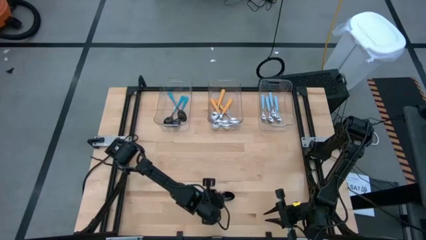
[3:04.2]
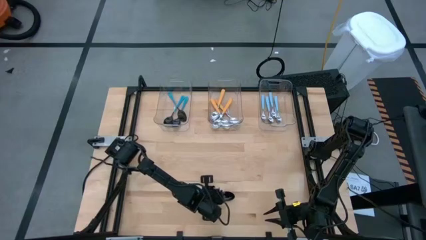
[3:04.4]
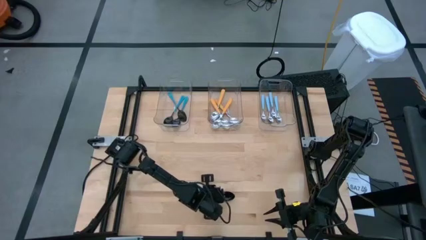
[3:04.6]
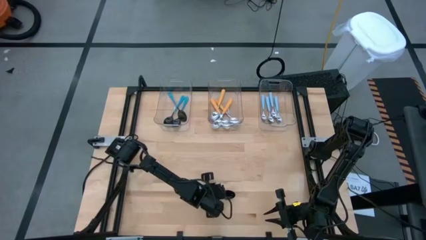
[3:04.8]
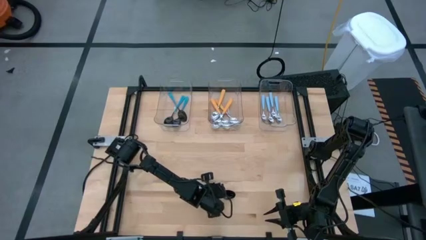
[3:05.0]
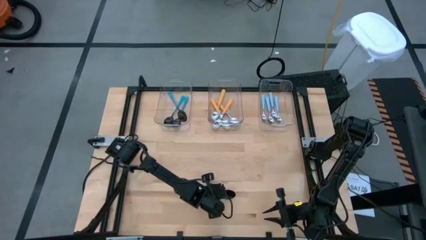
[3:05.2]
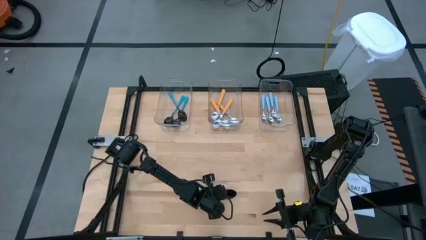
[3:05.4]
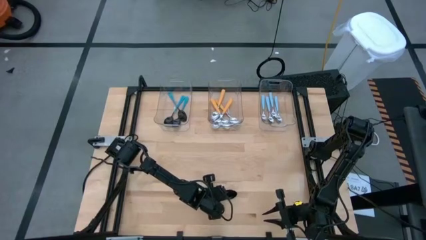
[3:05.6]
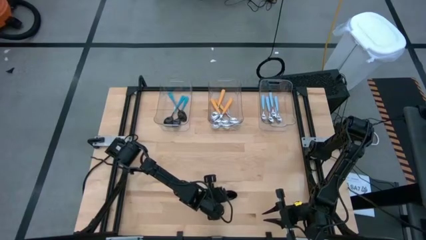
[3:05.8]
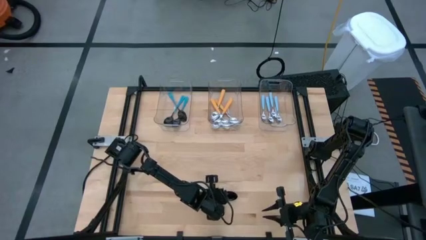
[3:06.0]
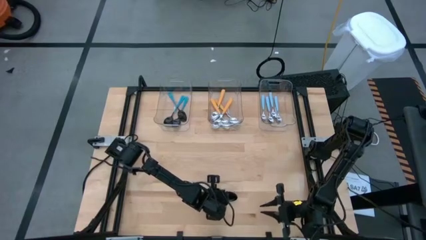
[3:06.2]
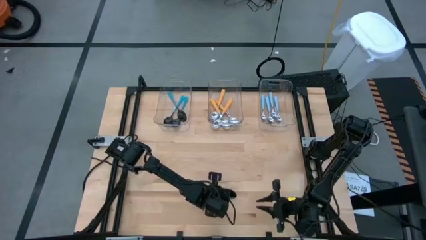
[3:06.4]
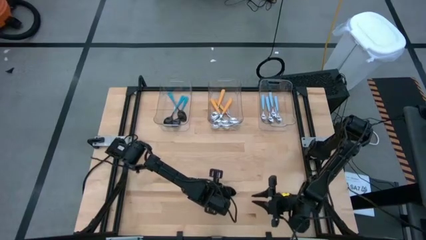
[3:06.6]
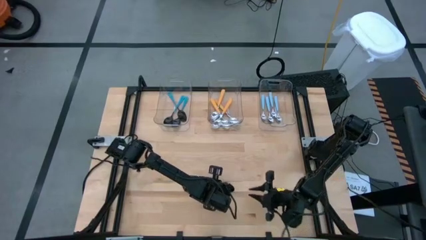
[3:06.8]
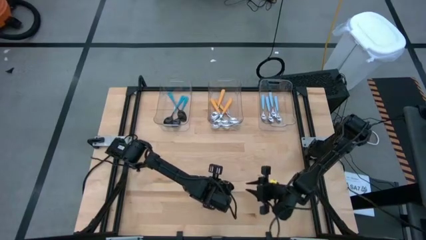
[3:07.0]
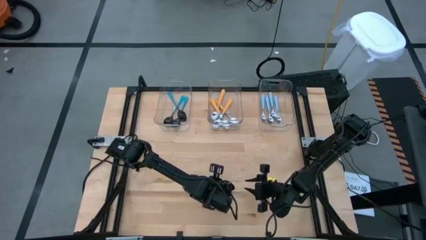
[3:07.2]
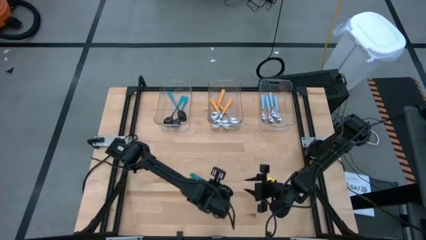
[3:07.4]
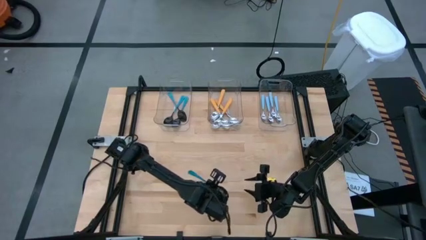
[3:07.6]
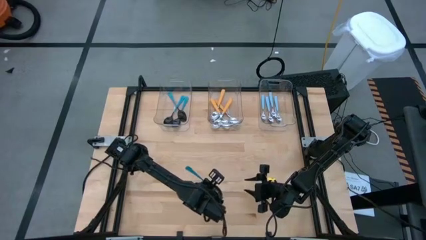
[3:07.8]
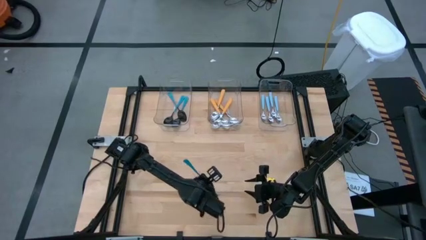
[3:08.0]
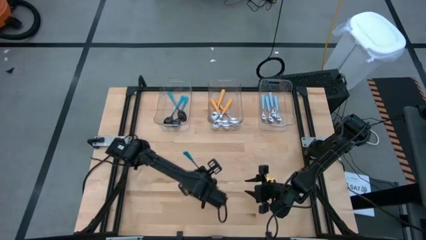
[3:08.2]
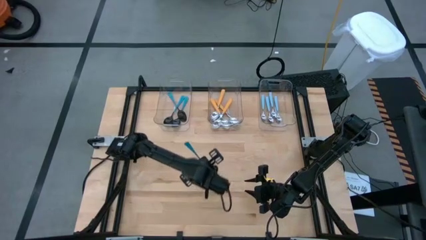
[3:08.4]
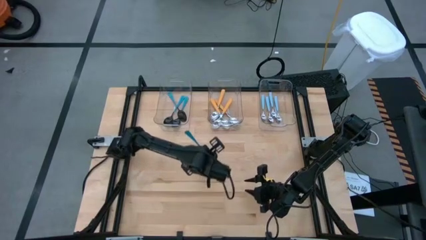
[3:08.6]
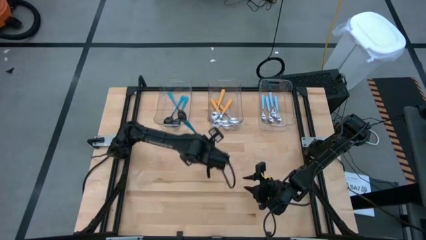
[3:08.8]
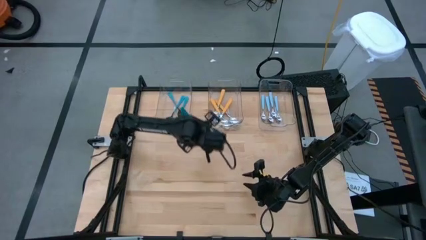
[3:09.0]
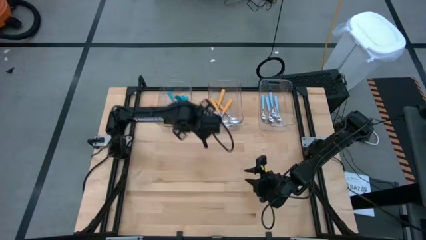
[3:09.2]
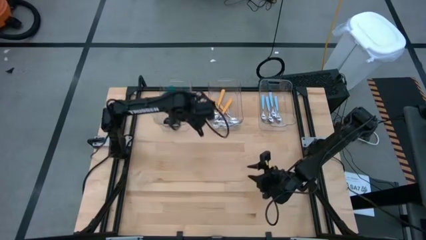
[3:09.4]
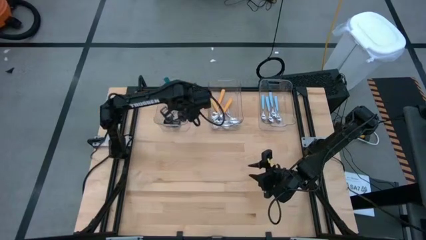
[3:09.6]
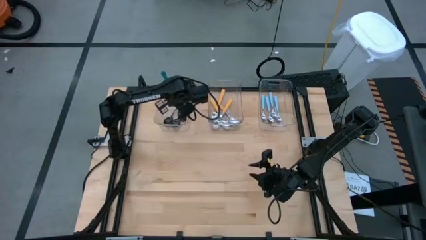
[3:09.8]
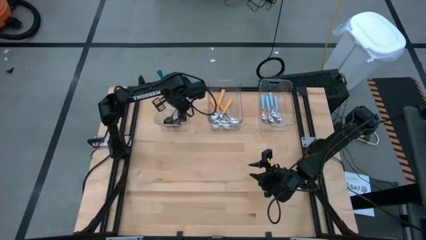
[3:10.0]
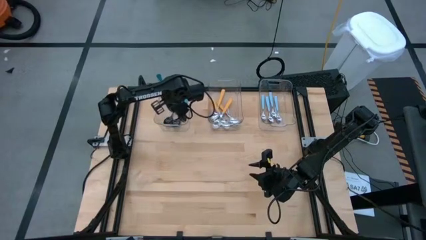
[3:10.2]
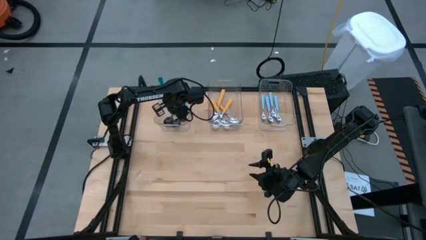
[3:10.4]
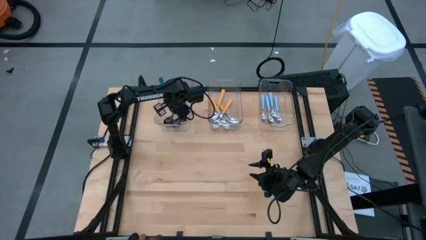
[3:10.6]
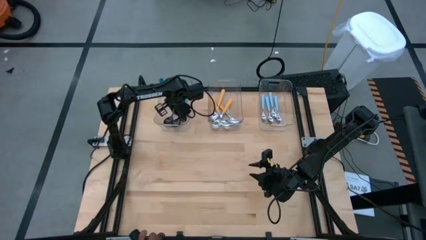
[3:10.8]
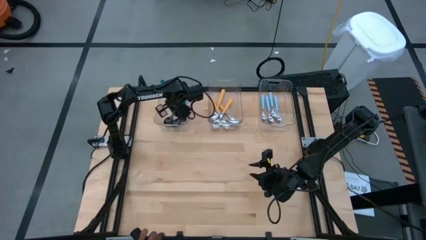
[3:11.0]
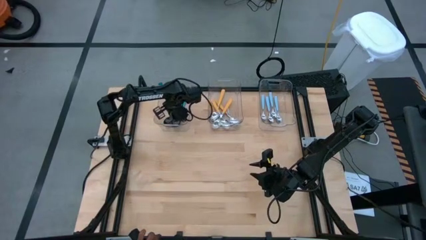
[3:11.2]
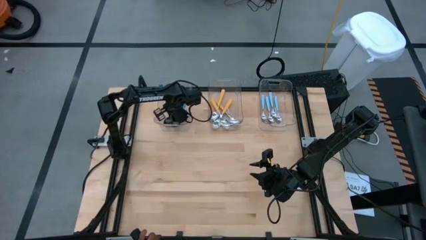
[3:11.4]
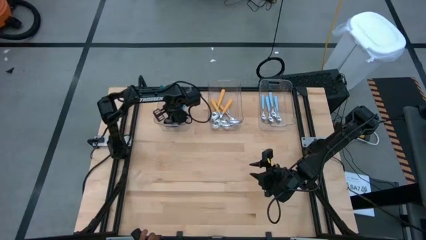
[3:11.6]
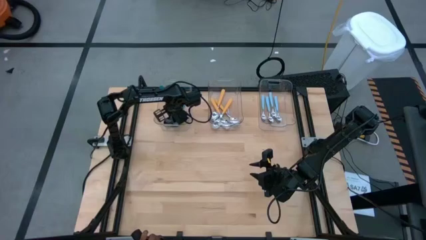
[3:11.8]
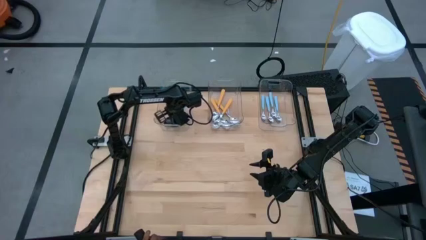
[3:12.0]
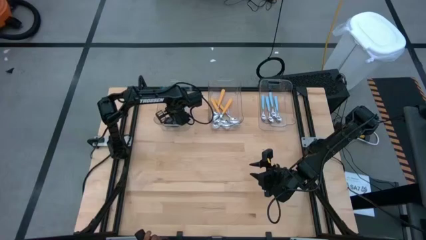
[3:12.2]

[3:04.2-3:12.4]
Task: Sort silverware by color (type)
Put the blue spoon into the left transparent bin

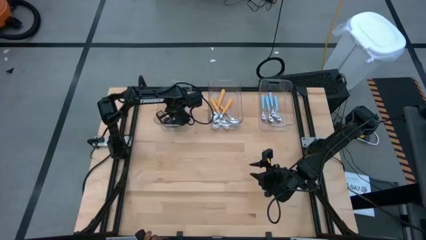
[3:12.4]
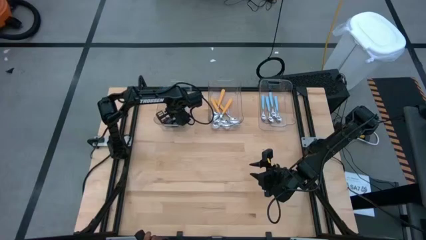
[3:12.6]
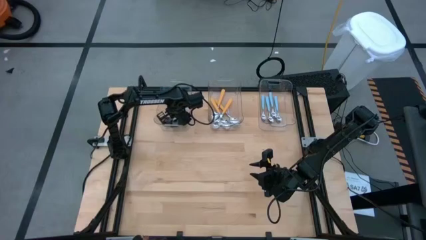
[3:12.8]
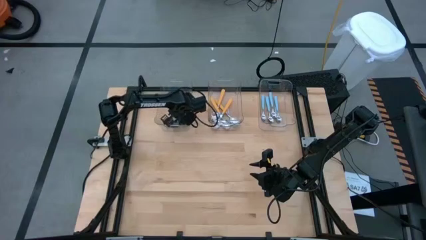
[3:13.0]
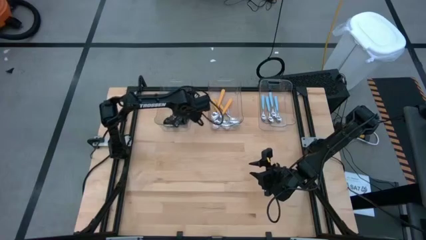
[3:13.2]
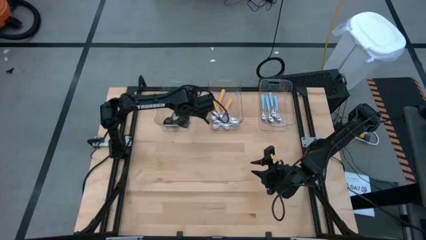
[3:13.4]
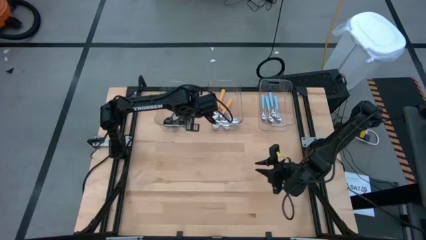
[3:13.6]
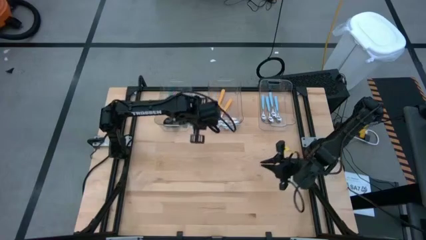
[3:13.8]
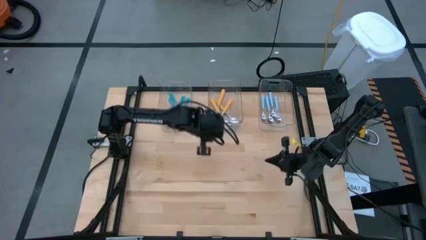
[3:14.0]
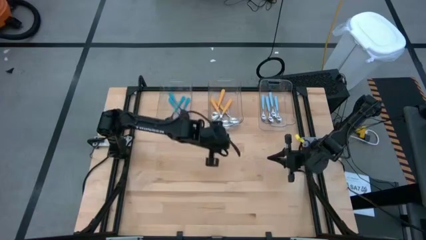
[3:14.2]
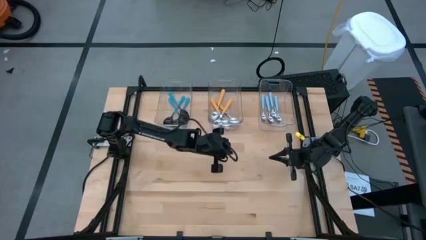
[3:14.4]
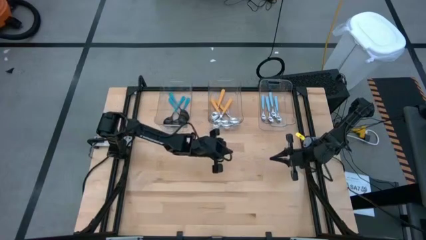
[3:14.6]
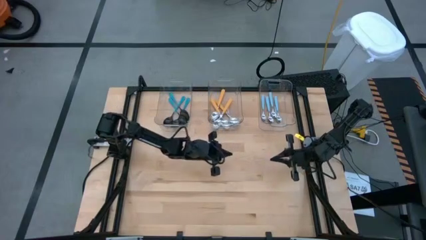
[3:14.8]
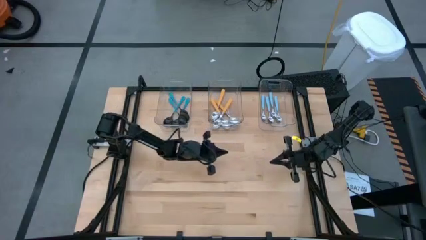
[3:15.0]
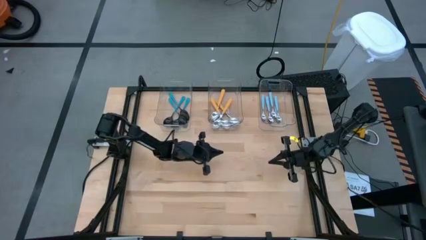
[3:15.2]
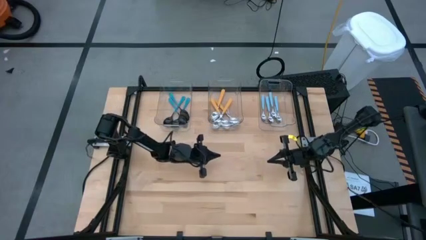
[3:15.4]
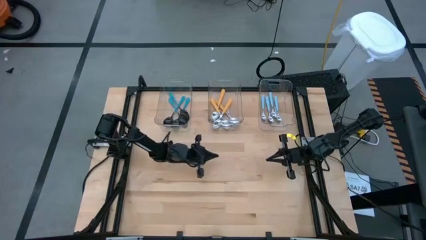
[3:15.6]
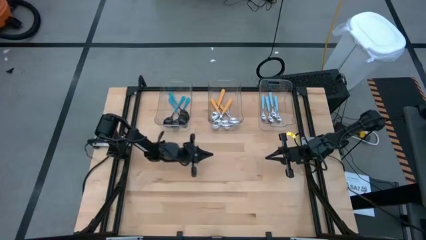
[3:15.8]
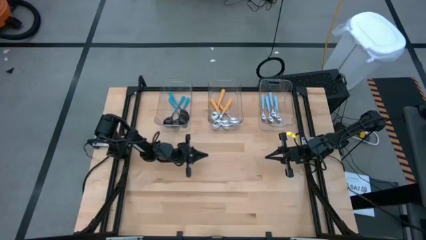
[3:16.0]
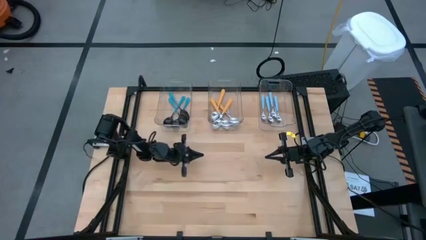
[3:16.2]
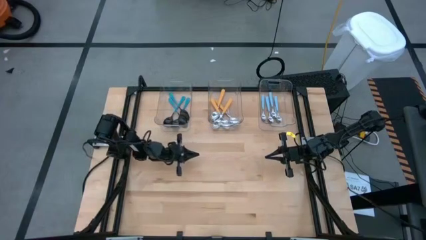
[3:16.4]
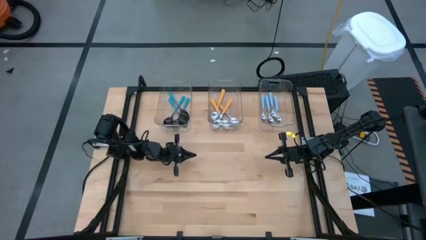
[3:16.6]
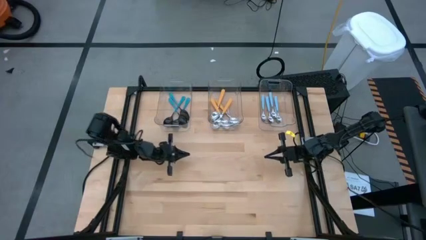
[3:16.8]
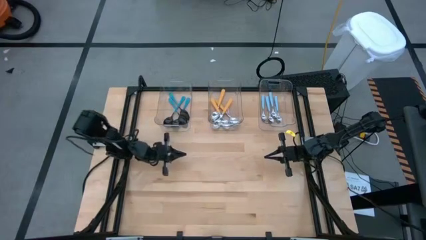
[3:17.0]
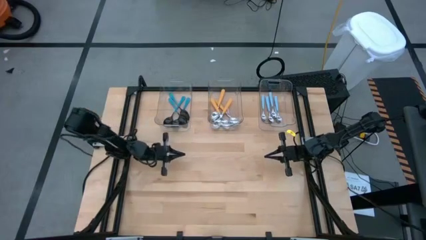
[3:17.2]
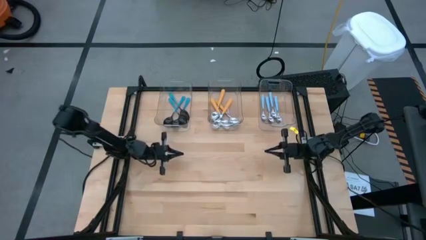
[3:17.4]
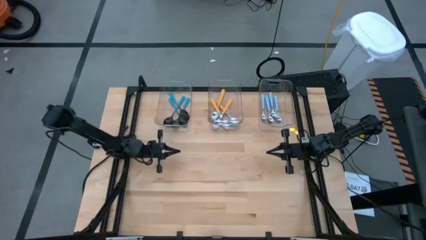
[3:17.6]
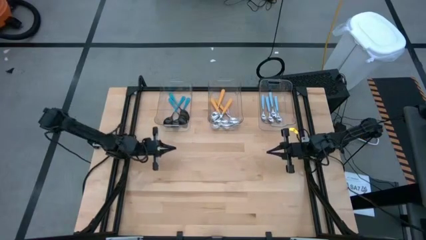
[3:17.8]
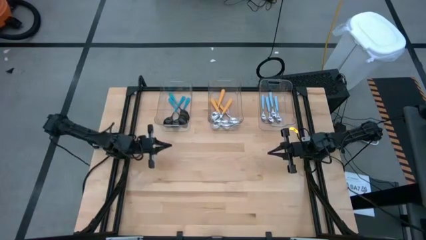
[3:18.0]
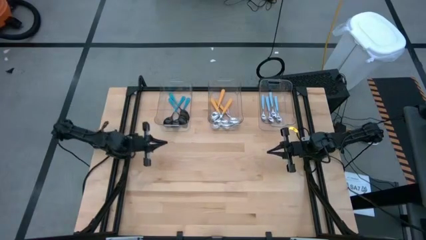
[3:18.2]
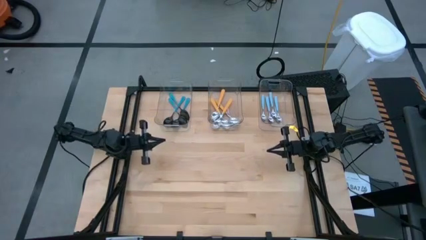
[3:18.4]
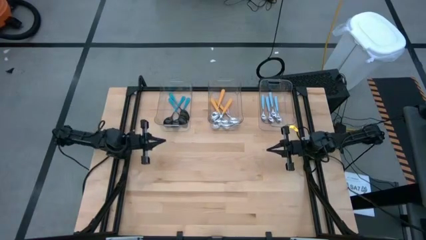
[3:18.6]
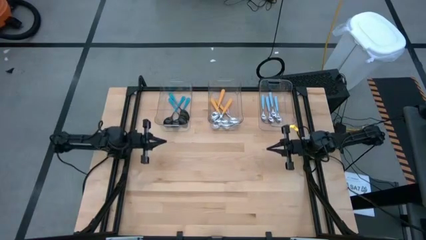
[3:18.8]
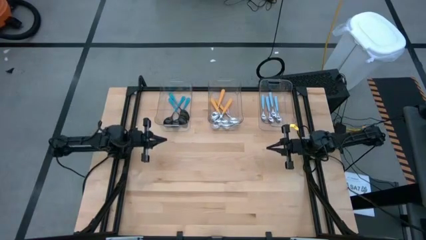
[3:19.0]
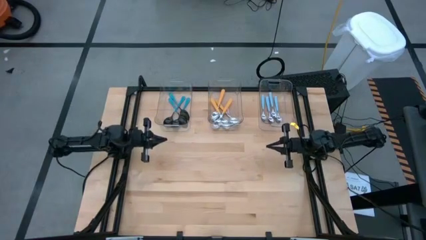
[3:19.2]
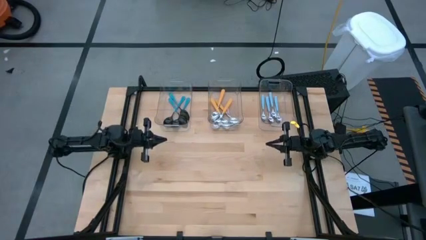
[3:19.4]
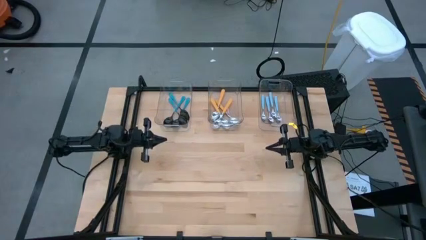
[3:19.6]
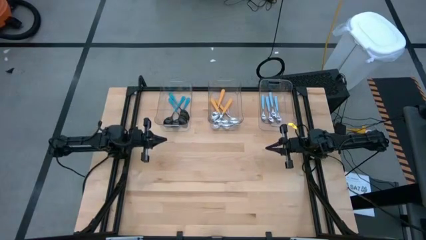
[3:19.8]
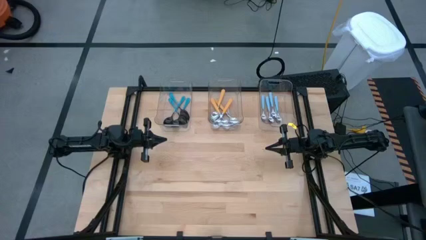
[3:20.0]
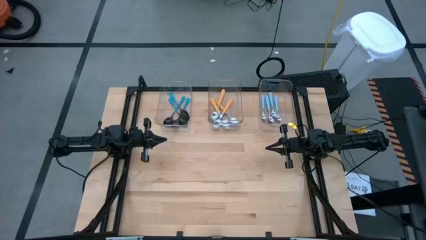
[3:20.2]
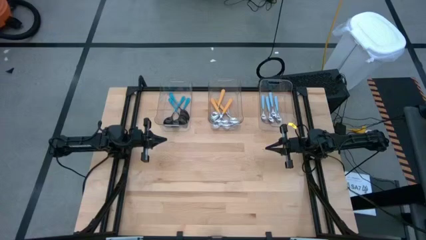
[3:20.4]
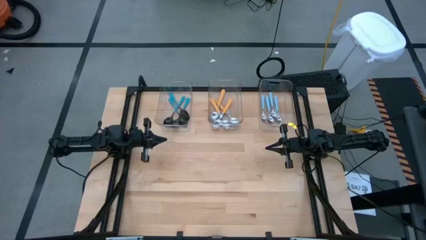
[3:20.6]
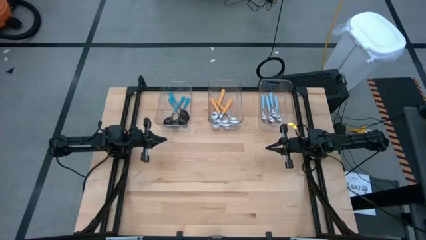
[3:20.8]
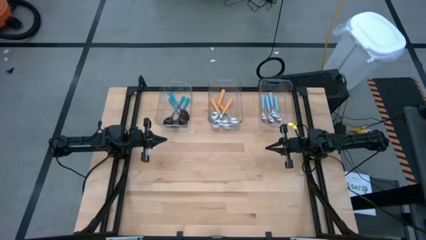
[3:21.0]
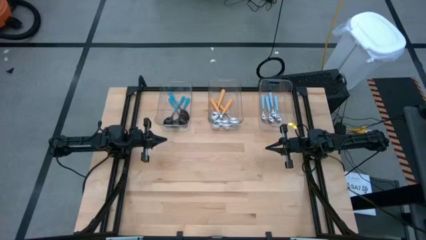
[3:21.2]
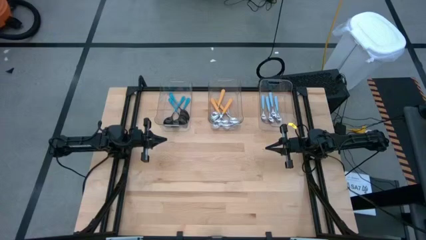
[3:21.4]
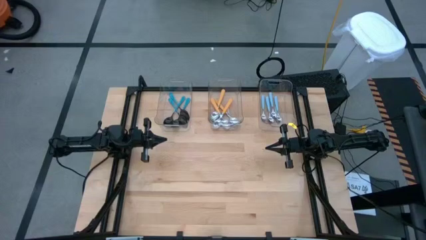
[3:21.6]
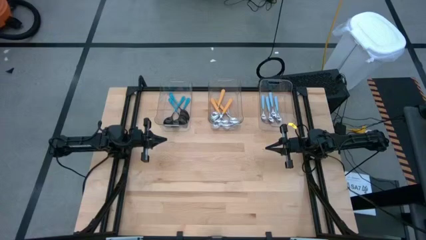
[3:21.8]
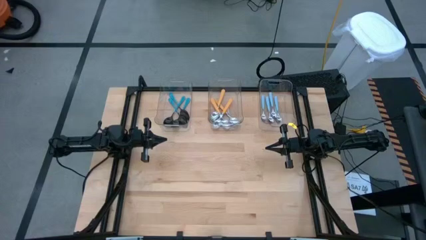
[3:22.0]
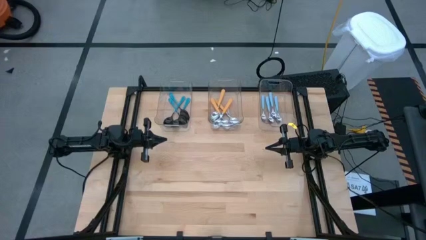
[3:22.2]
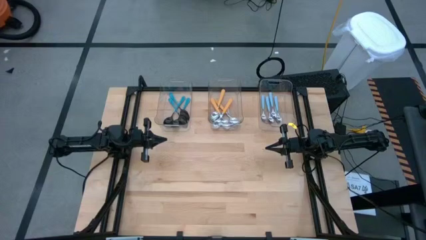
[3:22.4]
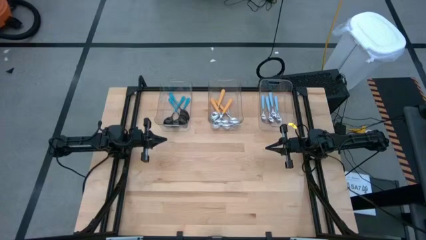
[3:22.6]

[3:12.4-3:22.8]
Return to Home Position
